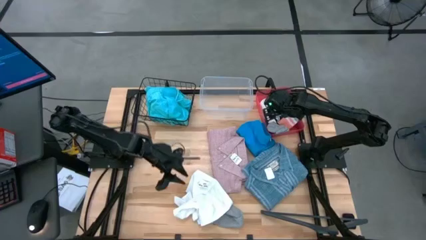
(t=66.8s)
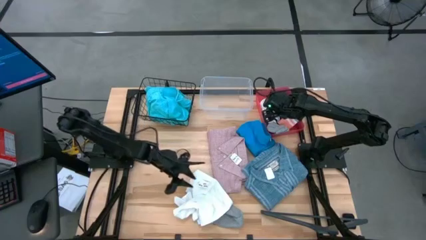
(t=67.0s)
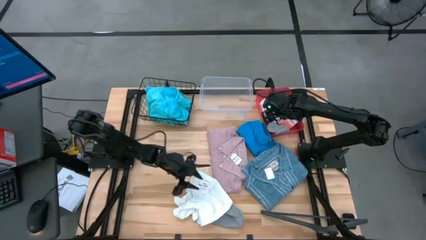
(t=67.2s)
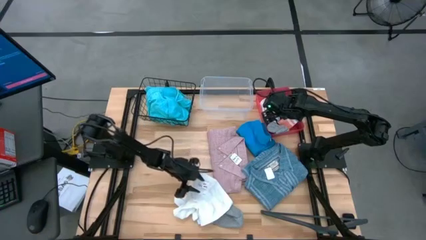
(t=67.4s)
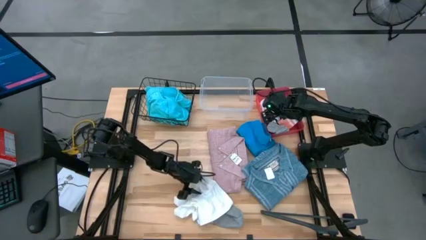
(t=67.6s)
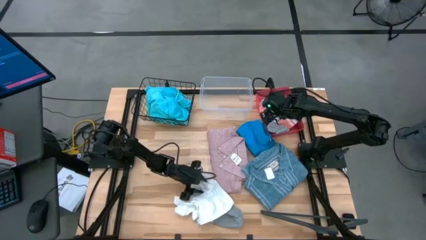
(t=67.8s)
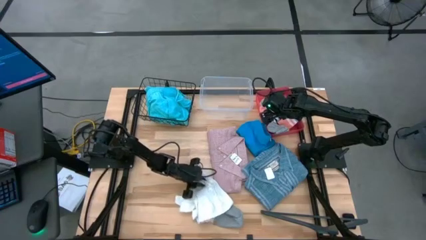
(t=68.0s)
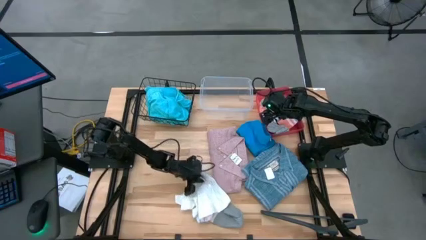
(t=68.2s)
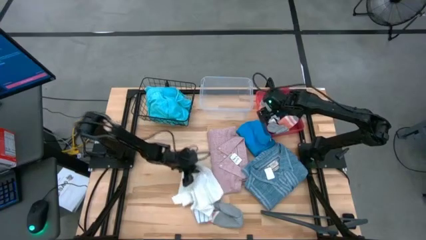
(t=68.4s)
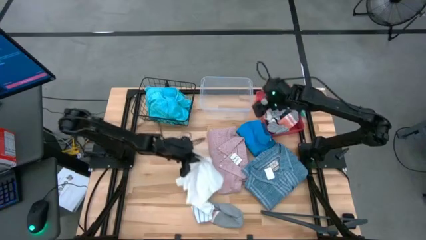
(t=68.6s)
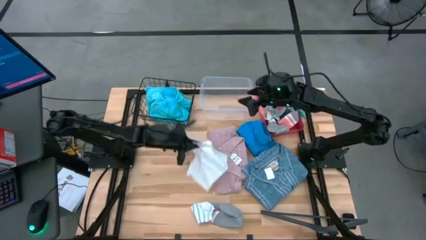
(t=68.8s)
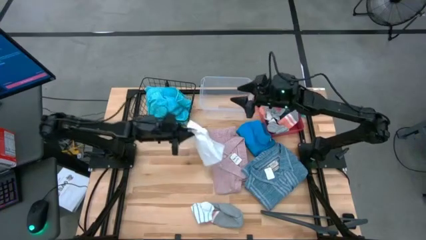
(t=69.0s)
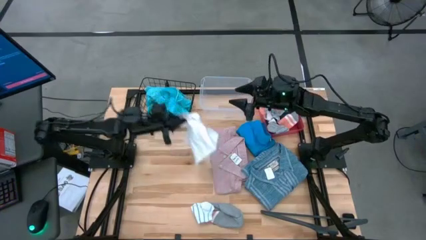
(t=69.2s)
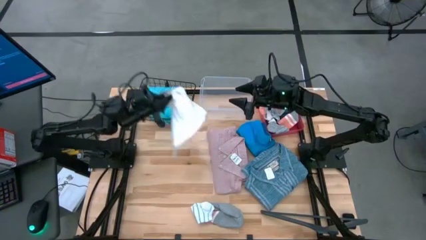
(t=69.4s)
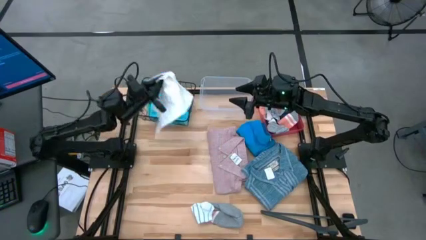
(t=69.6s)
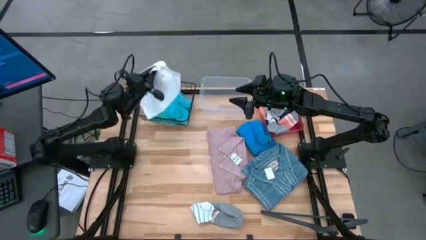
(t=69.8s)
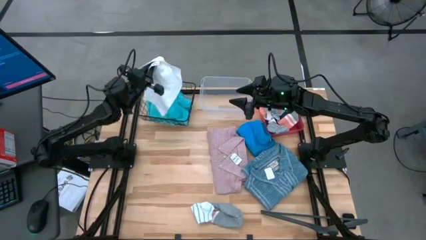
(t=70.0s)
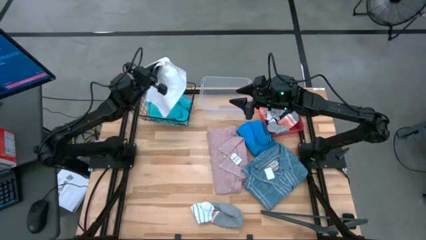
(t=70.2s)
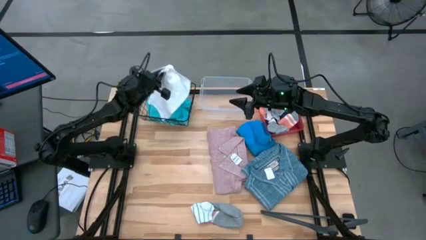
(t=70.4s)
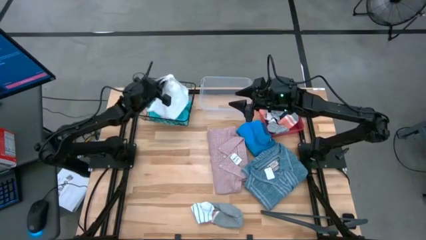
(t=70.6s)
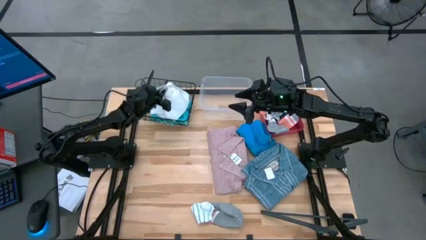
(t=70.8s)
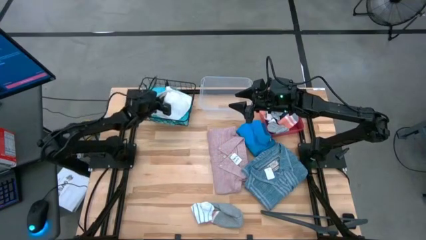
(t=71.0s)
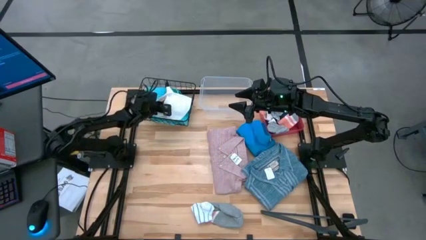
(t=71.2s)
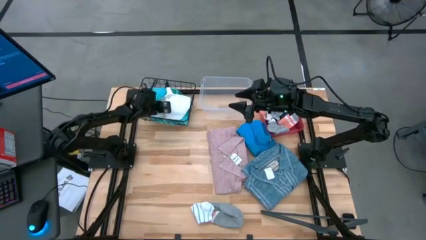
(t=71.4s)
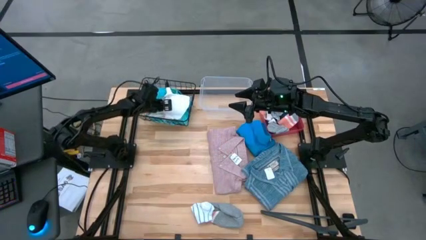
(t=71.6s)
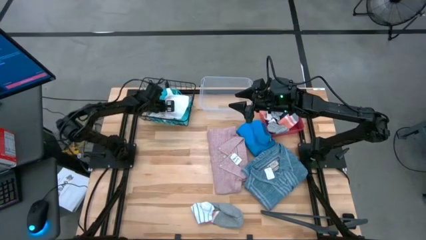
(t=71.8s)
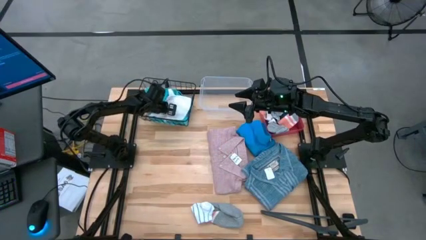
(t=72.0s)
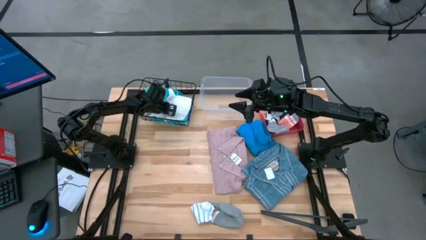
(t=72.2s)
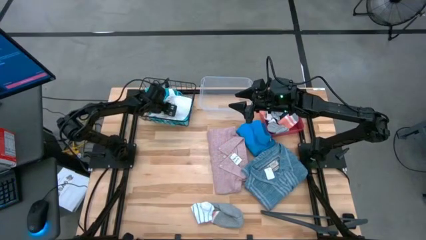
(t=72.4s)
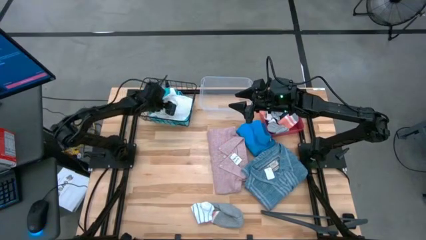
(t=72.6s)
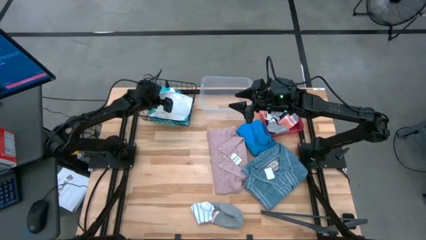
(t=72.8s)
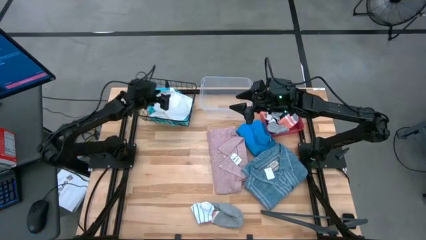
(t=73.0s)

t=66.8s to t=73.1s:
Task: Pick & Place Cloths
Put the white shorts into the black wire basket

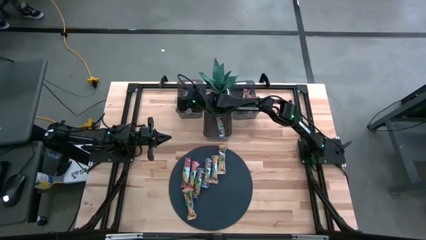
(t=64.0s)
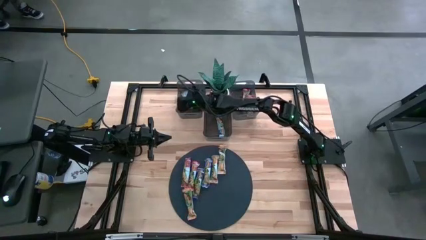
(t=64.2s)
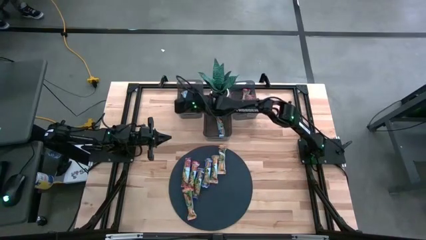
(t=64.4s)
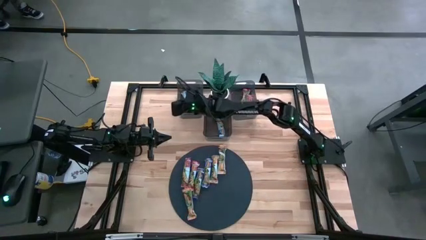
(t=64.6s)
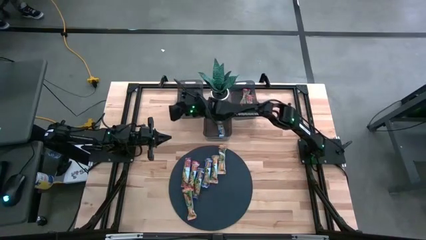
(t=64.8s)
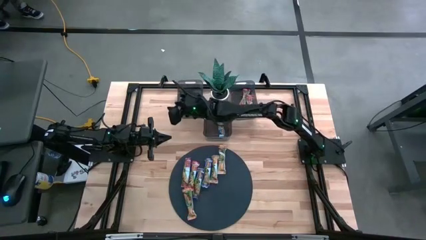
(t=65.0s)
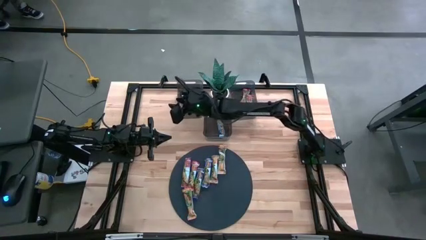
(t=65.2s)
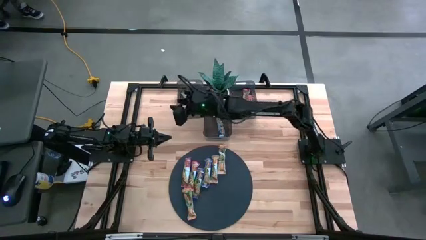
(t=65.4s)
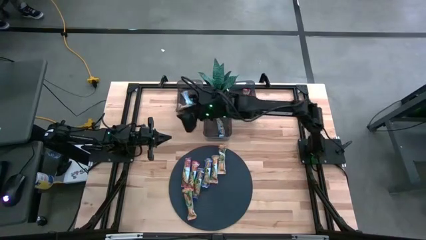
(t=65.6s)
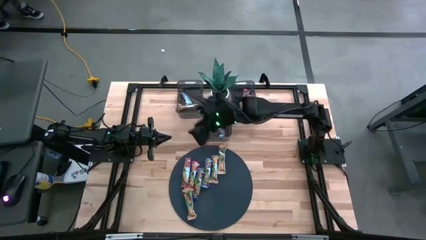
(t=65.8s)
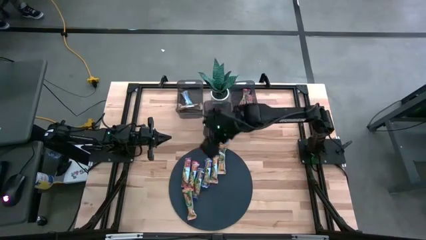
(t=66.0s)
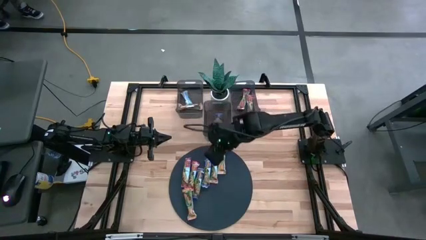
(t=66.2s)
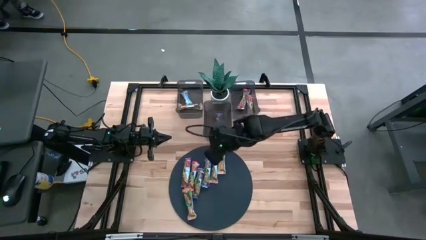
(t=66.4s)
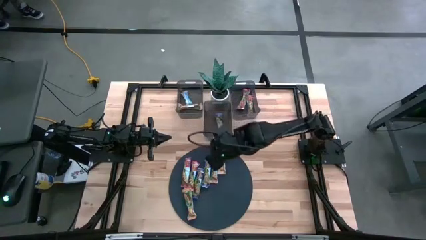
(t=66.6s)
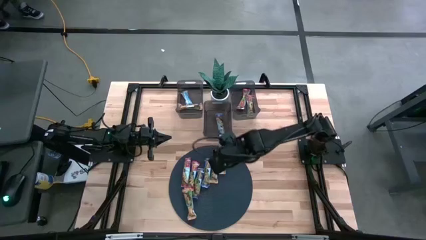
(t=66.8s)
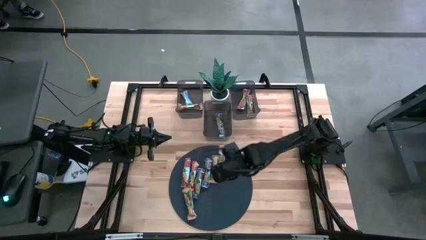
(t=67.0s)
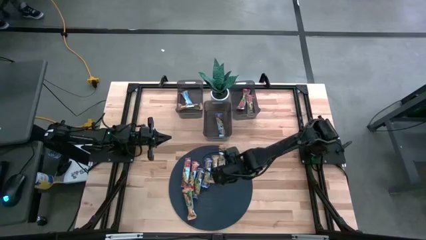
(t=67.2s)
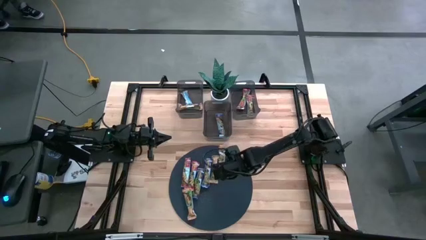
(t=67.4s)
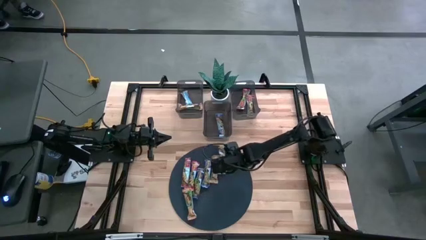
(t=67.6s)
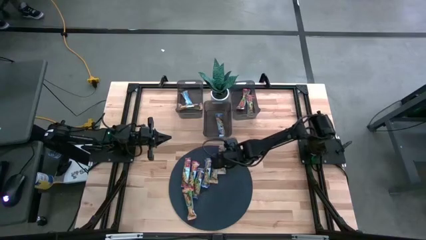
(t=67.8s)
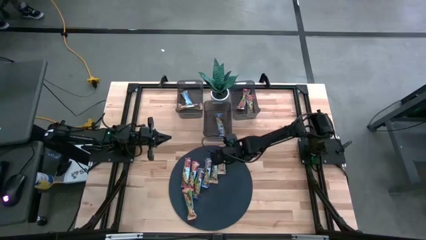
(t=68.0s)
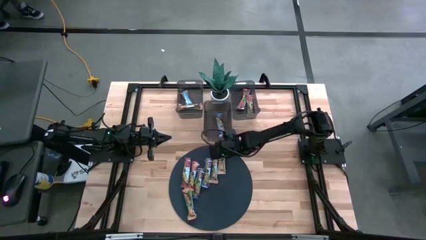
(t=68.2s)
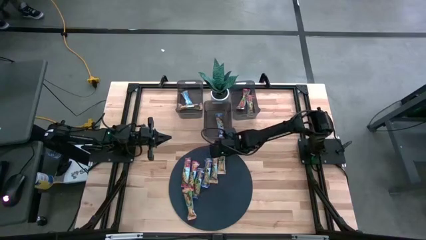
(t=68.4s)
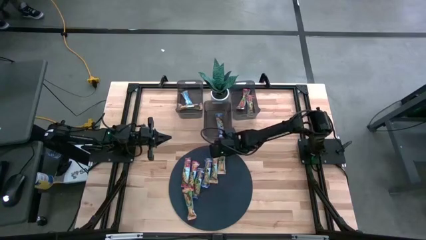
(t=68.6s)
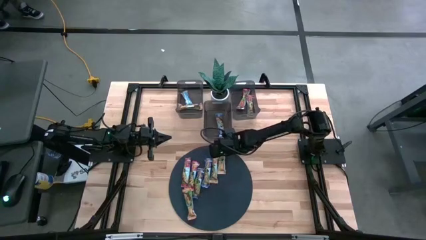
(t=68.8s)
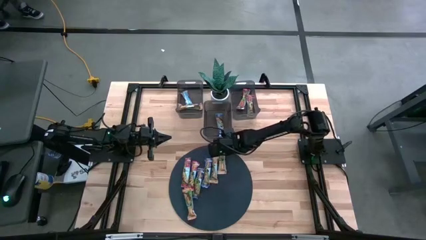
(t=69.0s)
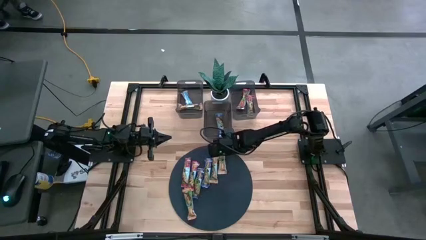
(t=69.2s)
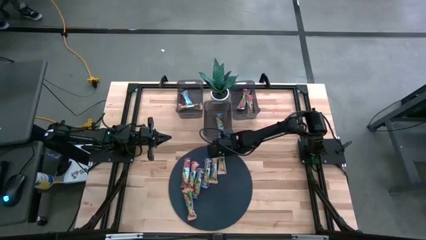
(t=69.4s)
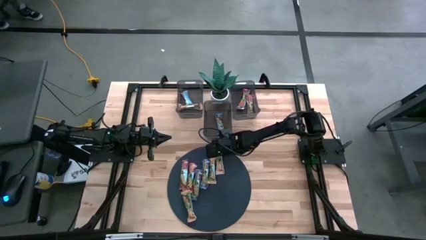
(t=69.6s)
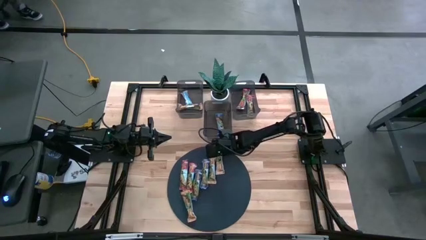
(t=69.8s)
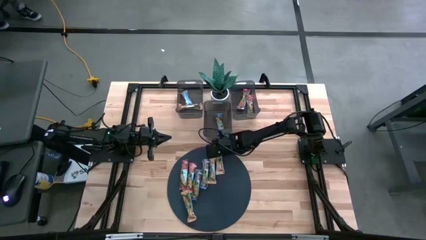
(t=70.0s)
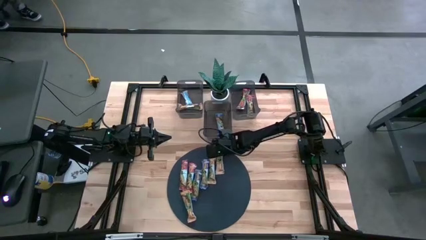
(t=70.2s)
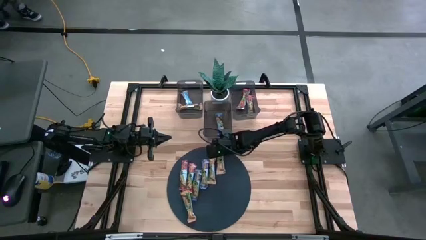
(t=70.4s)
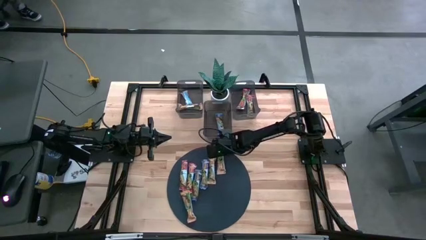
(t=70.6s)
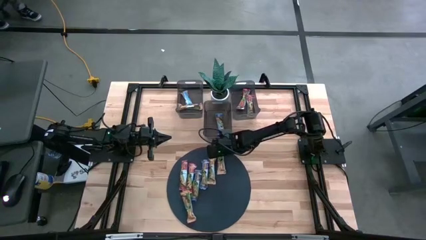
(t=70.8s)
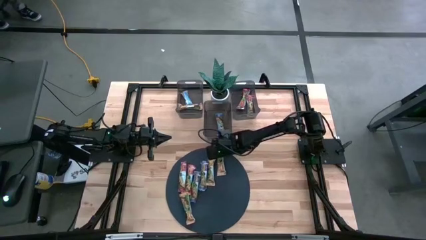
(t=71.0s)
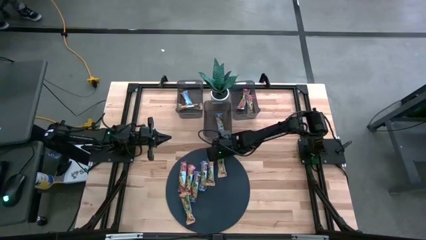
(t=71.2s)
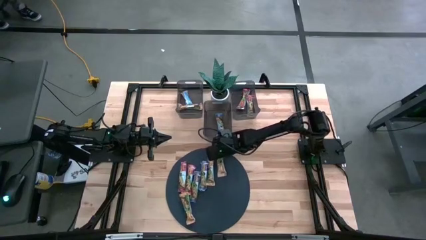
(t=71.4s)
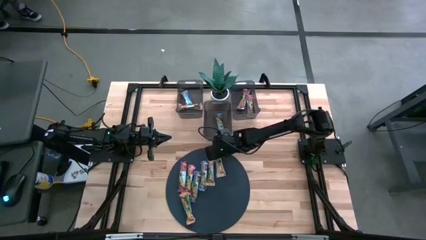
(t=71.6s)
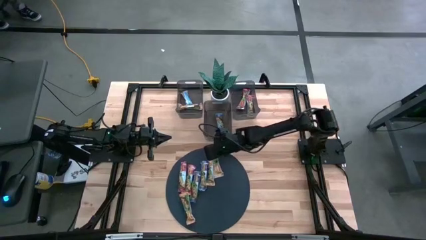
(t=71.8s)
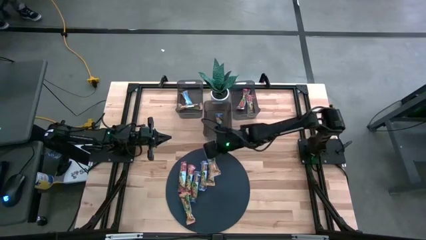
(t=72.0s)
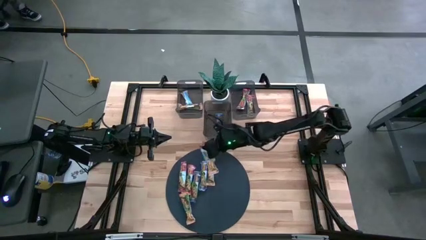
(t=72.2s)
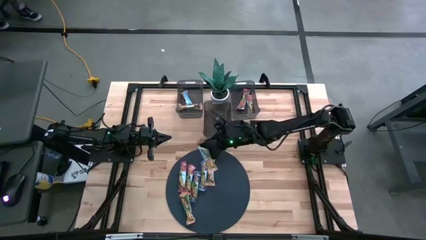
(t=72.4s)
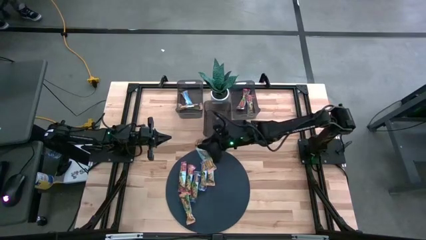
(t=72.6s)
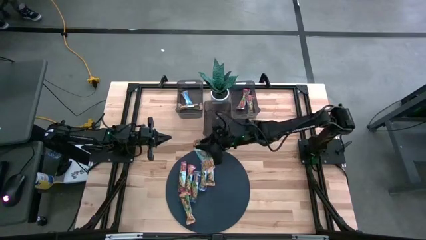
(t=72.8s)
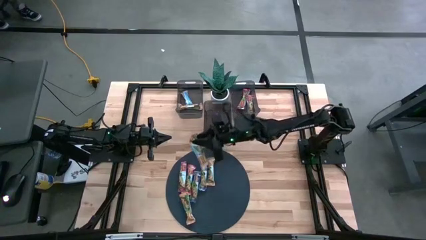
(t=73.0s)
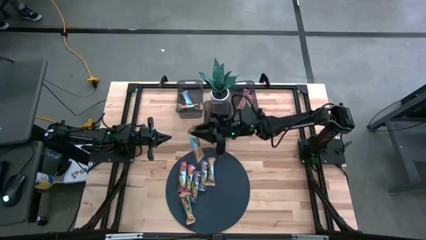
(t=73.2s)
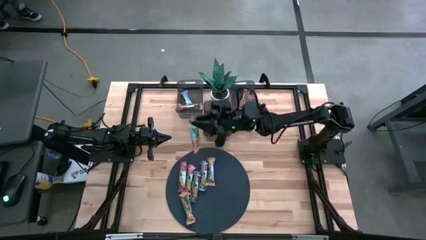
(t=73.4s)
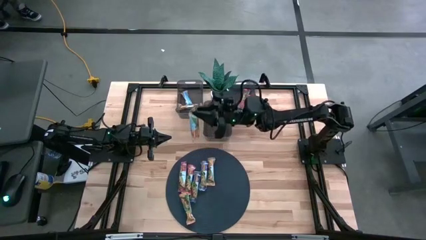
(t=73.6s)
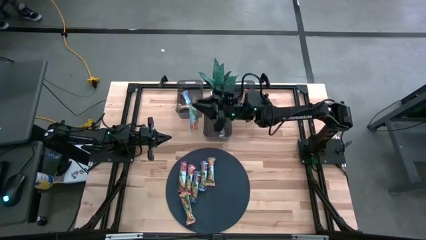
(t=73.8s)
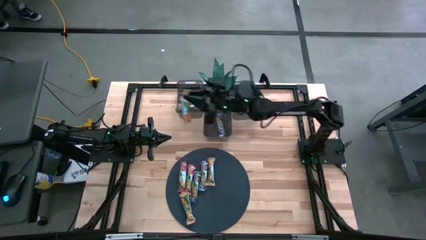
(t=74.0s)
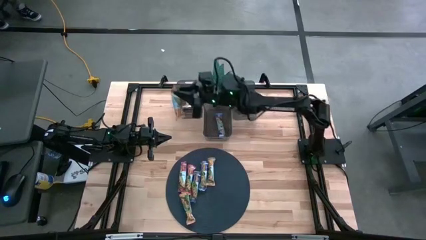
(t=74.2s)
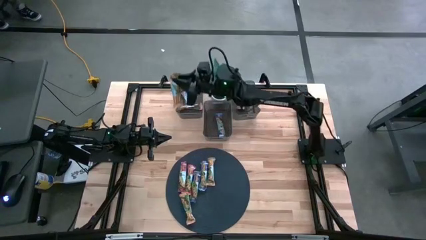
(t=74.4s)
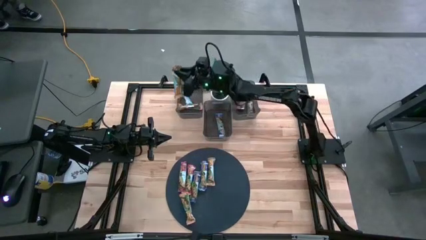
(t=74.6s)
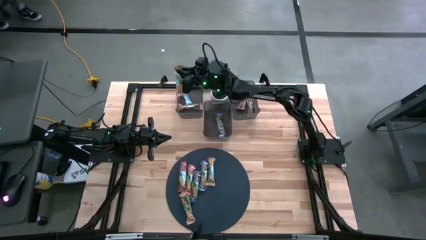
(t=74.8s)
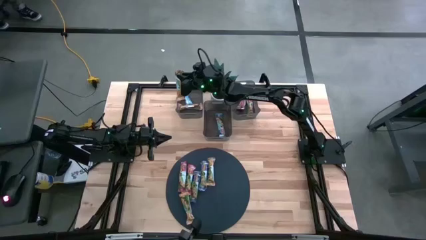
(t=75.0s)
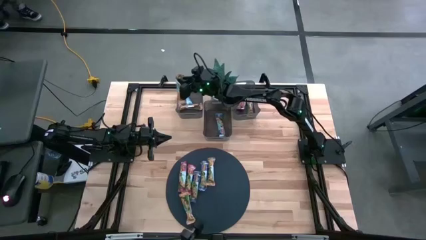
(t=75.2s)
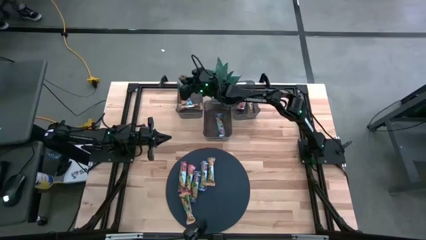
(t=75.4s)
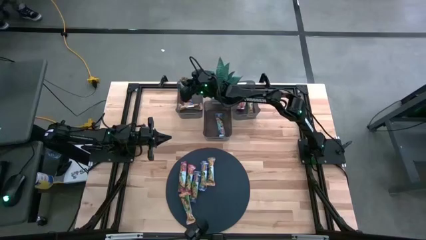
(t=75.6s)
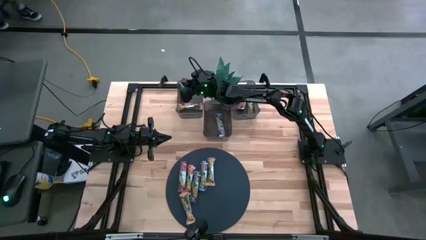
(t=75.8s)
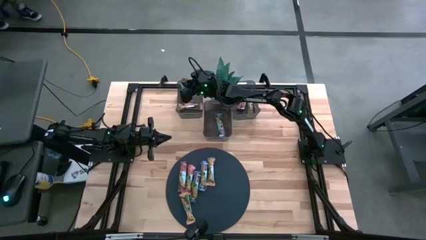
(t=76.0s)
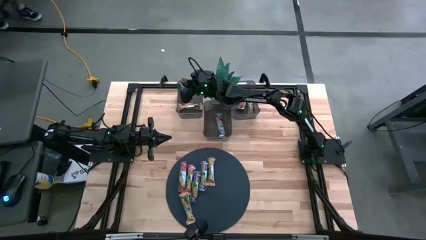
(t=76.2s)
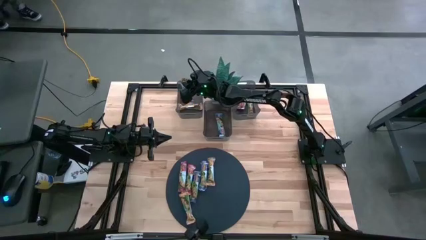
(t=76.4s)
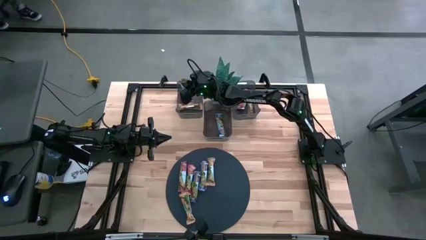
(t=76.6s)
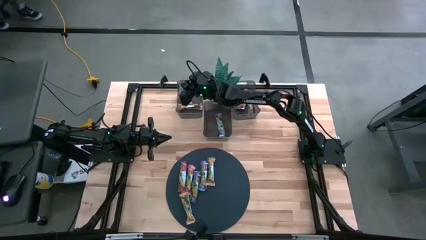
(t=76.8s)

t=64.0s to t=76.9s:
Task: Pick and place Granola Bars by type
Put the yellow granola bar into the left black bin
